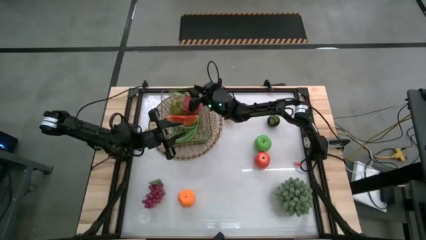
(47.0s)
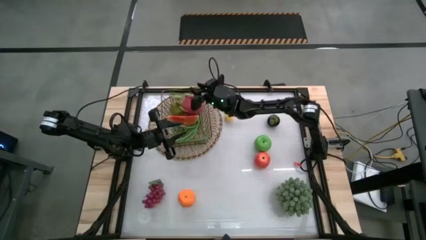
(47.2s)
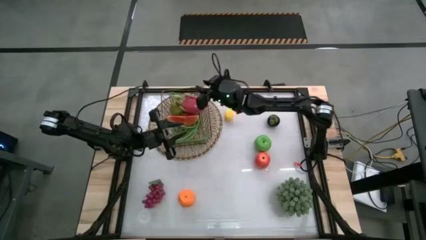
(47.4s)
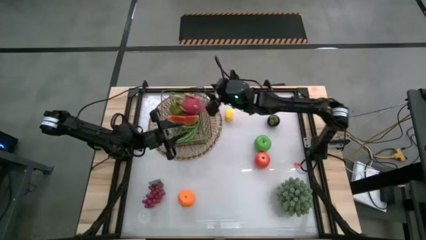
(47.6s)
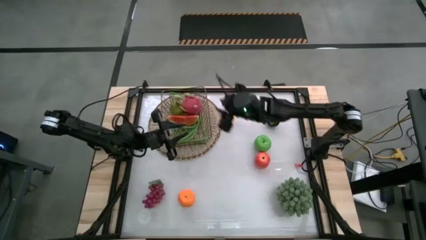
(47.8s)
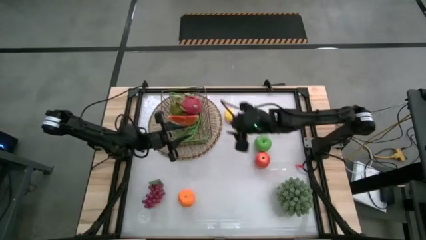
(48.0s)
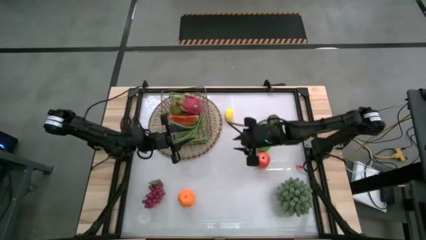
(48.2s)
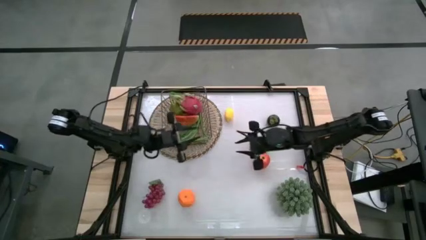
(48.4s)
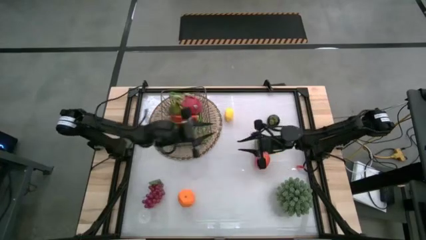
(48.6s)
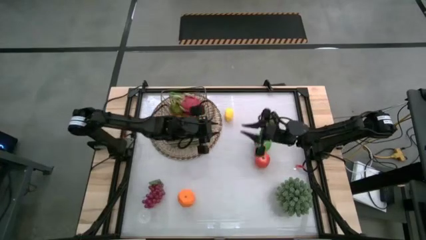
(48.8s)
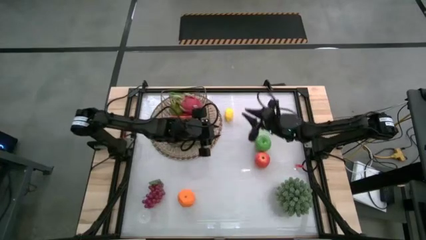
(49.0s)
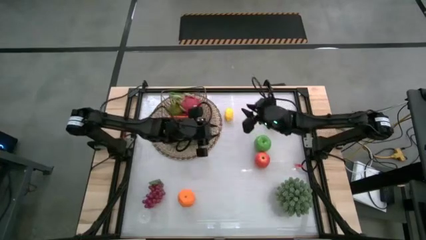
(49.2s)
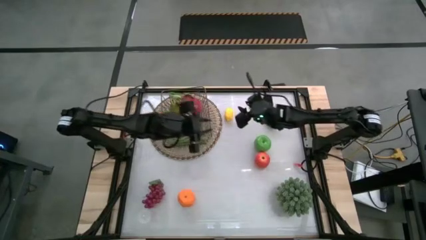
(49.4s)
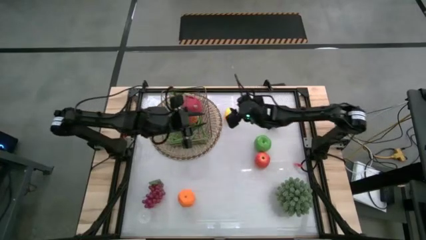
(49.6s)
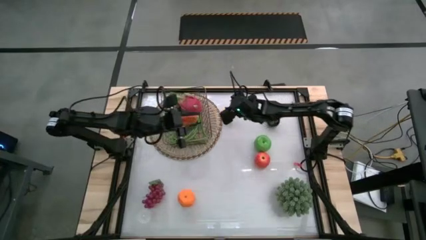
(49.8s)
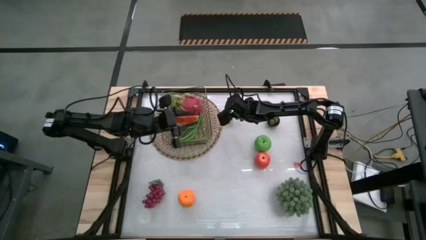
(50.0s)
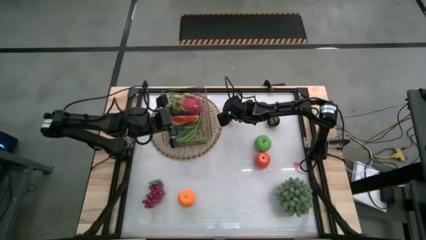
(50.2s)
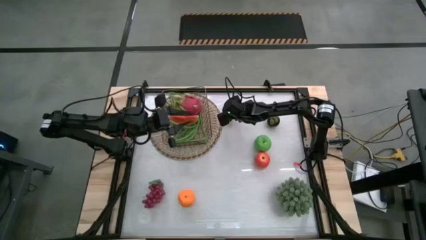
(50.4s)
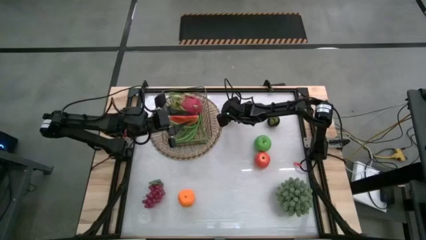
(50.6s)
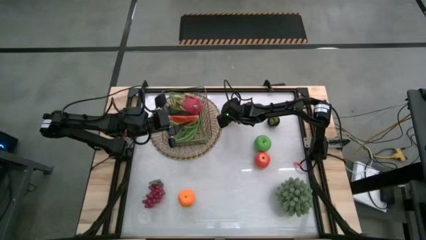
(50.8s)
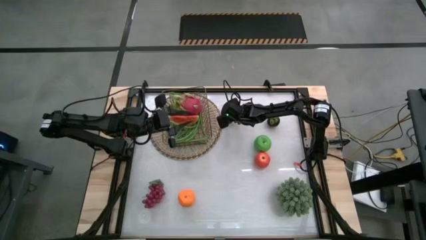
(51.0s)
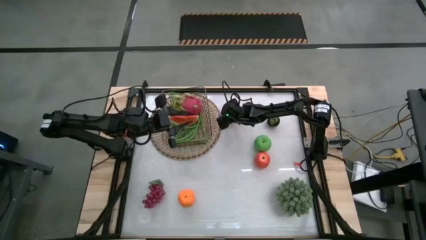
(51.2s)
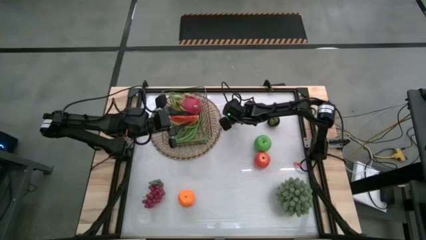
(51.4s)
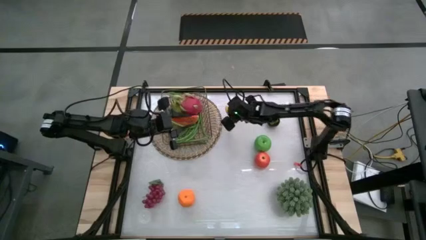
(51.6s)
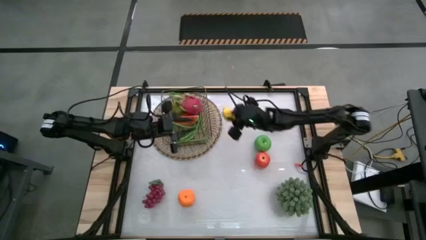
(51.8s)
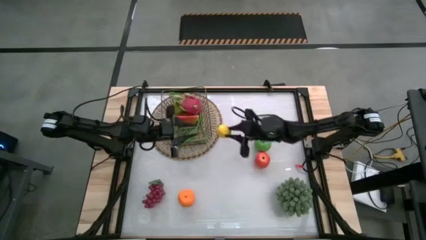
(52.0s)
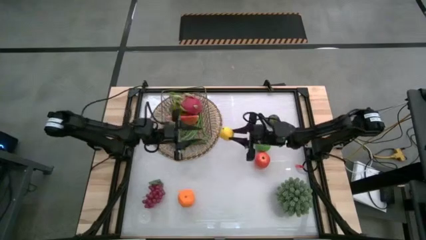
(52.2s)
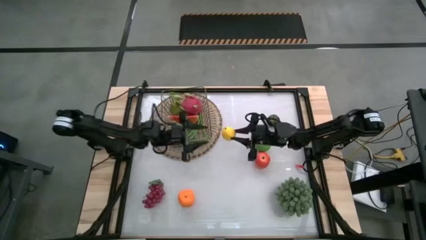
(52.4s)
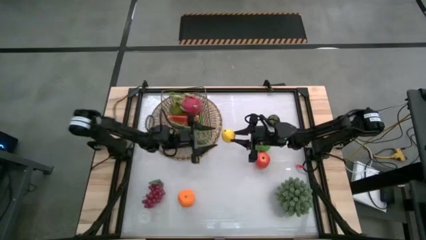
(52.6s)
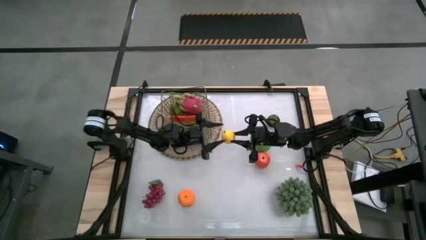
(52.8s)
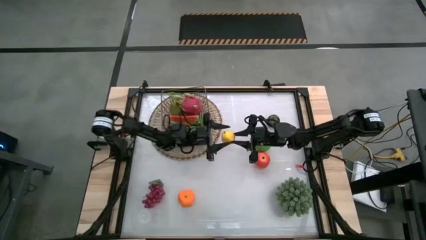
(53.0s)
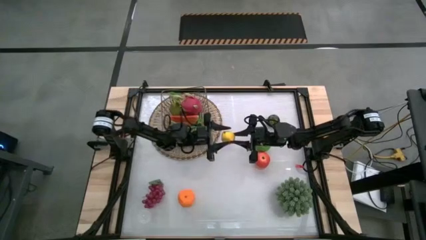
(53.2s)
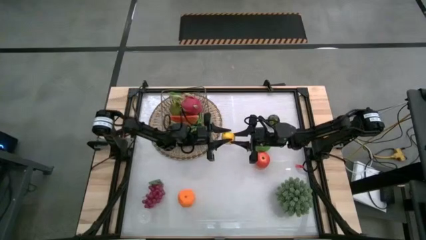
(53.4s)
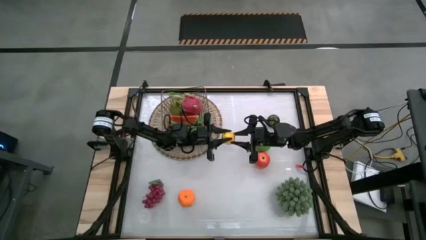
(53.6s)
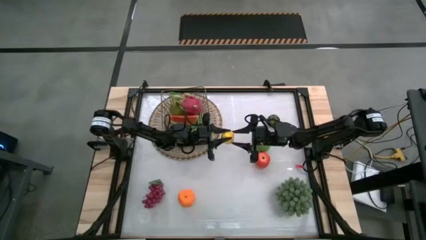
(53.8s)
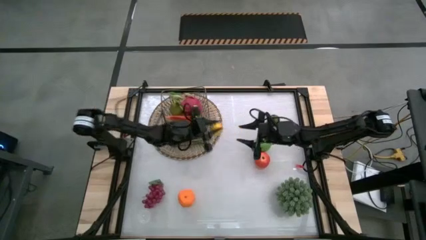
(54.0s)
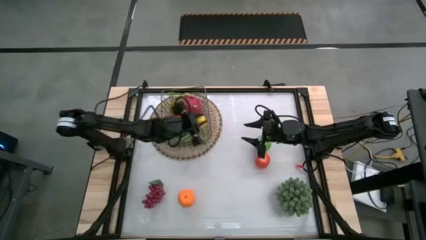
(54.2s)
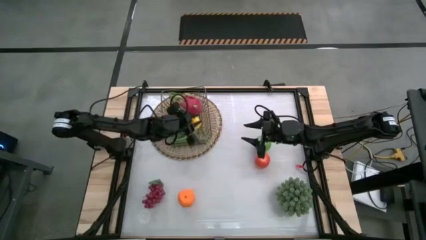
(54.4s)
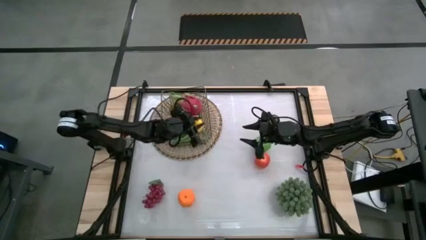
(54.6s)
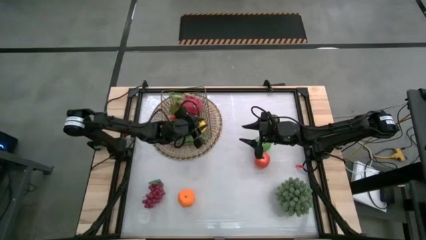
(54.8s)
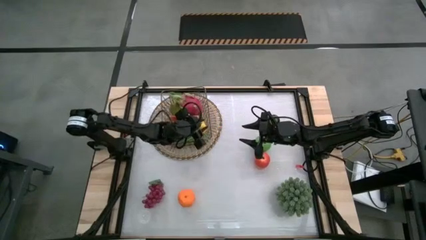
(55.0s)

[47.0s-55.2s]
Task: Build produce basket
Put the yellow lemon into the wire basket

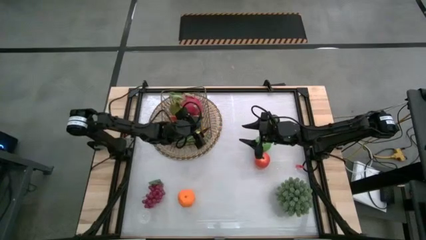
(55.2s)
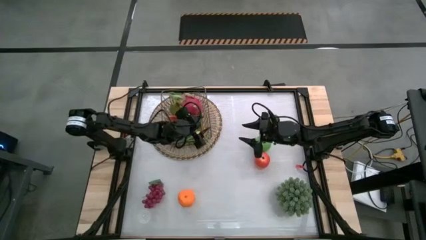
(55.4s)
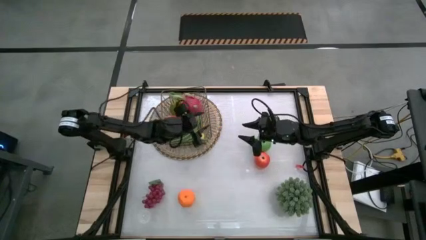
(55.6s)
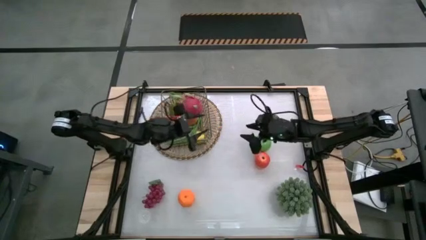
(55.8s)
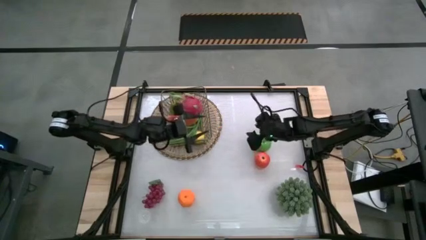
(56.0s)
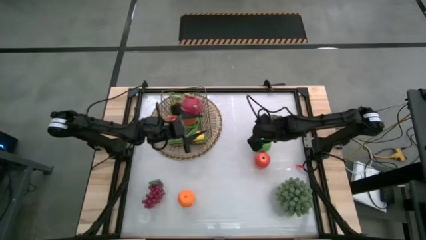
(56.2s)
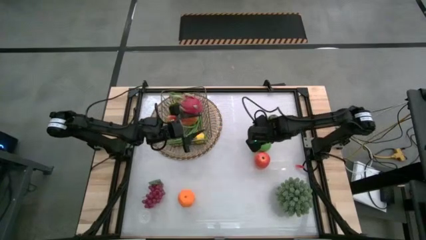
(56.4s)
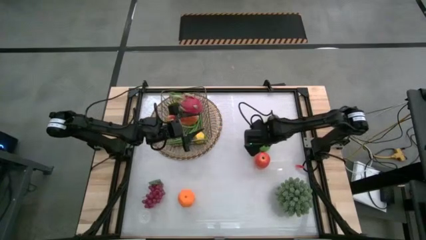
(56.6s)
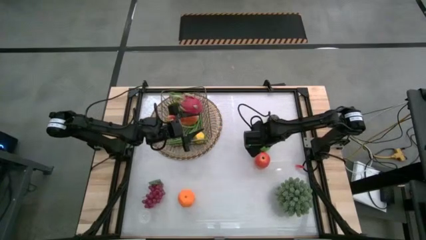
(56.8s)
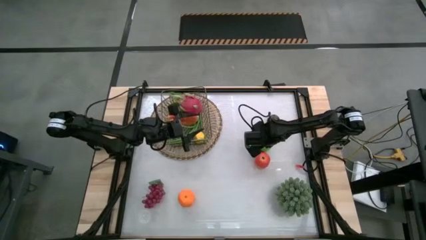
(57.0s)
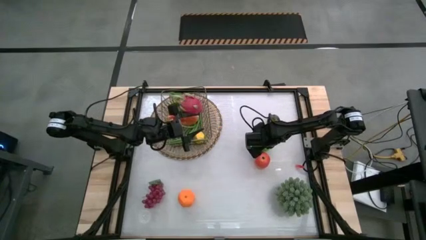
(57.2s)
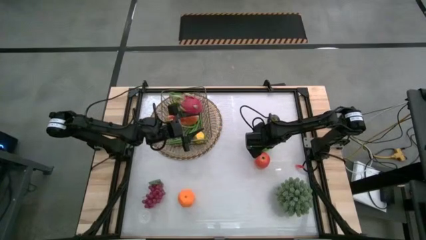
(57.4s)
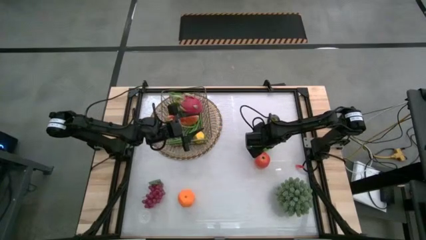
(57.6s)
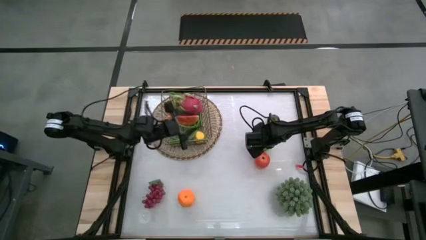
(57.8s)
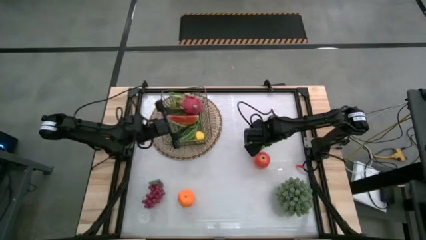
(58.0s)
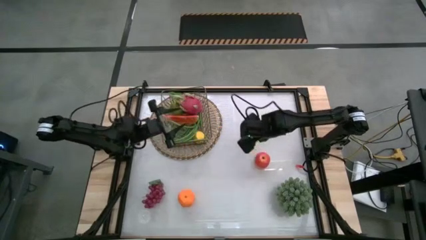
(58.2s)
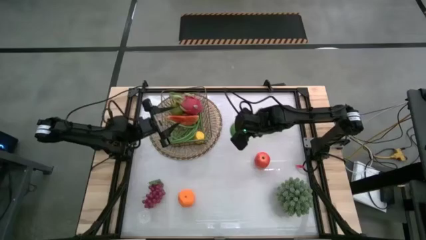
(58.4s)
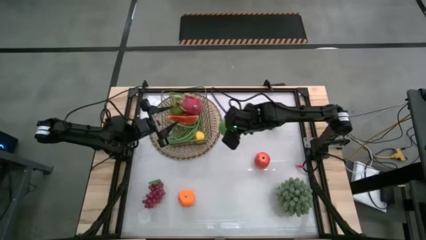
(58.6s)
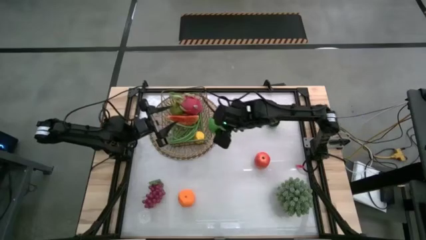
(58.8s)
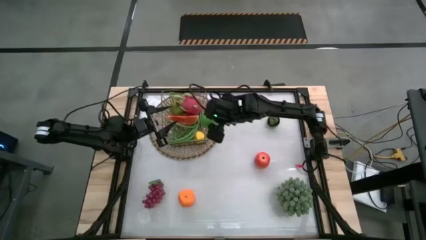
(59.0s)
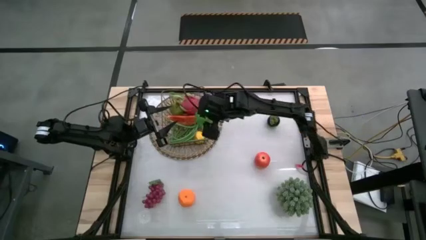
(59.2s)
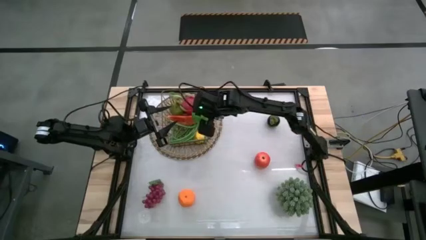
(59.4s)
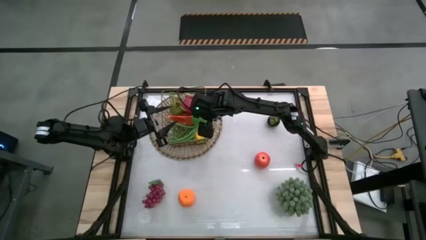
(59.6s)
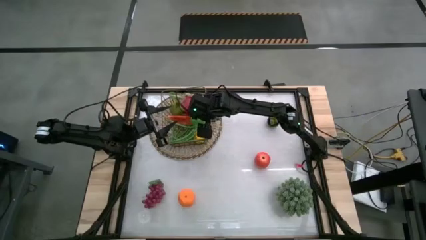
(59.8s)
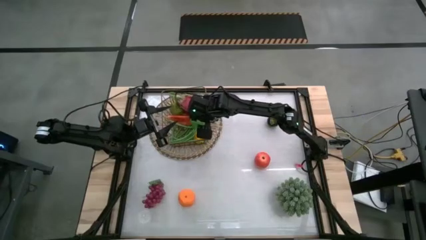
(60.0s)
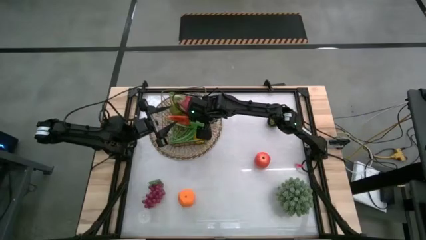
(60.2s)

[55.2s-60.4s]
Put the green apple into the wire basket

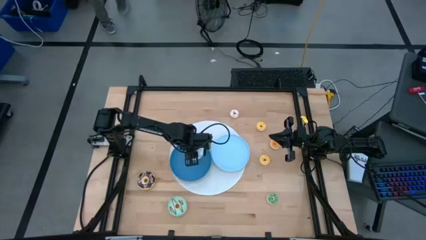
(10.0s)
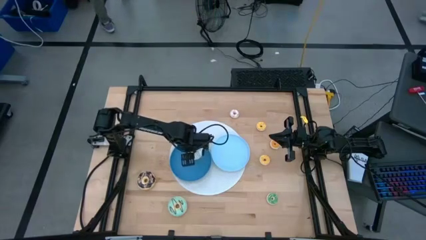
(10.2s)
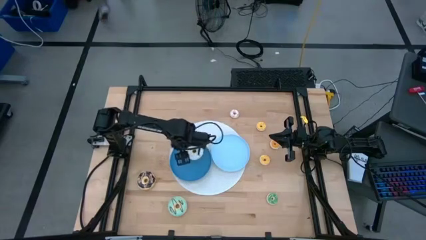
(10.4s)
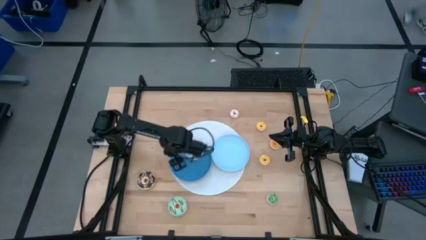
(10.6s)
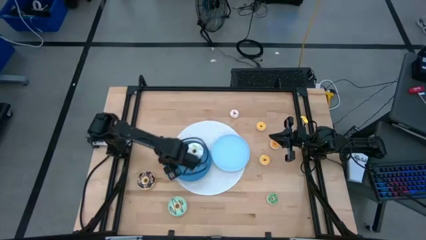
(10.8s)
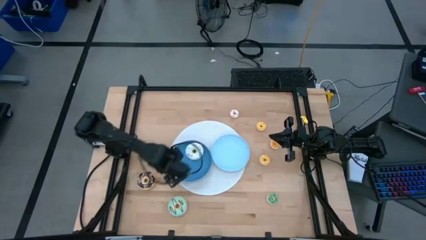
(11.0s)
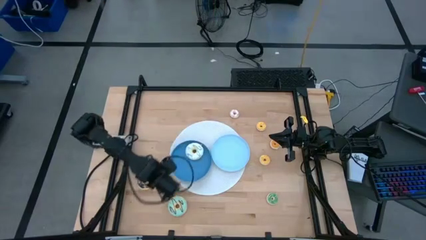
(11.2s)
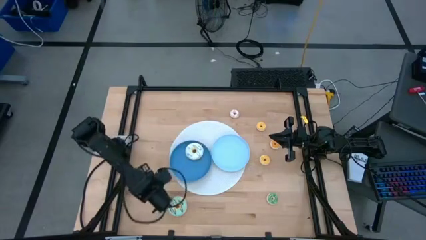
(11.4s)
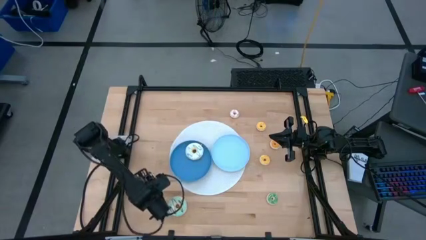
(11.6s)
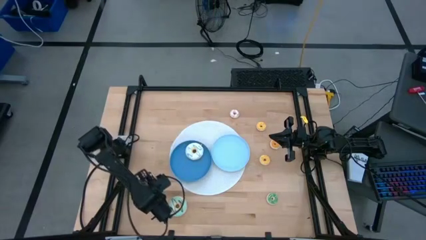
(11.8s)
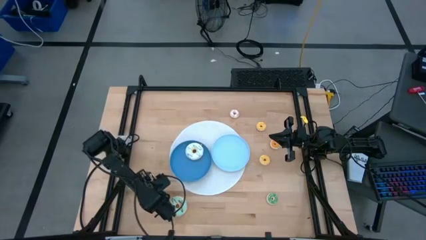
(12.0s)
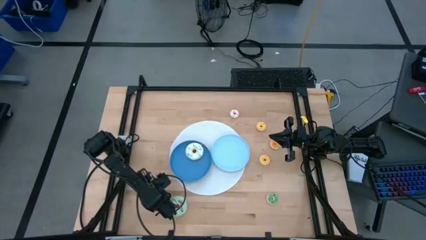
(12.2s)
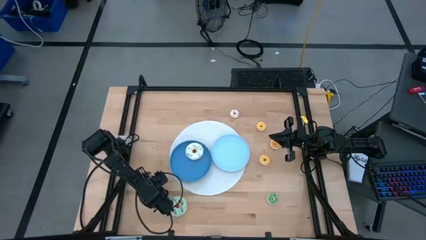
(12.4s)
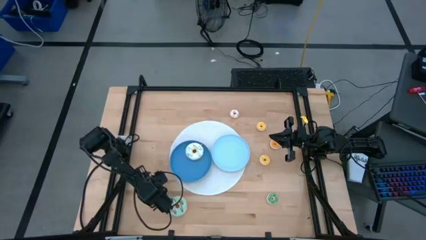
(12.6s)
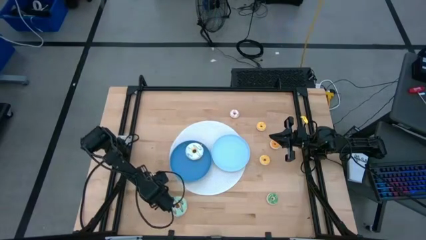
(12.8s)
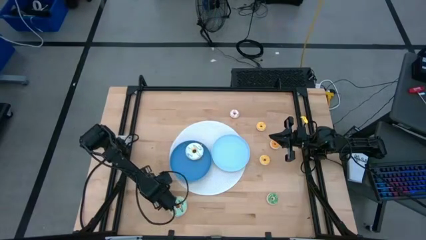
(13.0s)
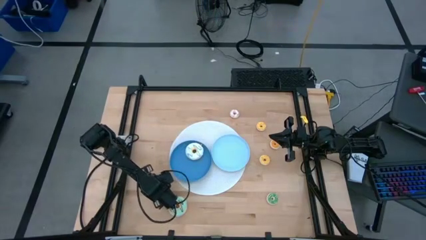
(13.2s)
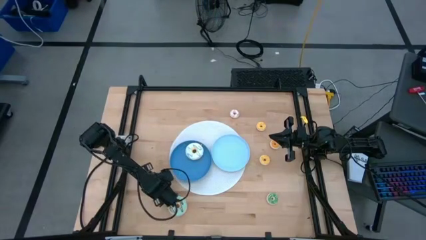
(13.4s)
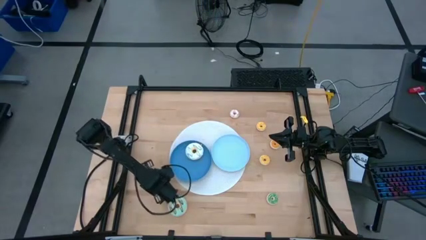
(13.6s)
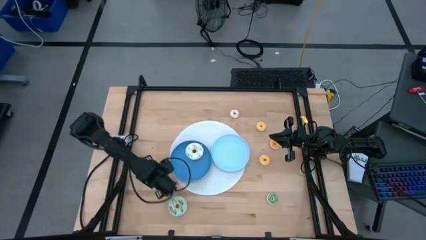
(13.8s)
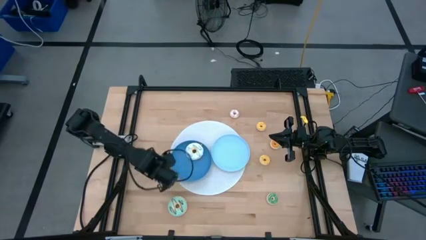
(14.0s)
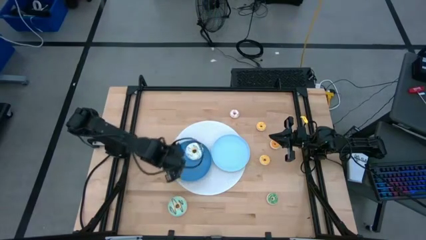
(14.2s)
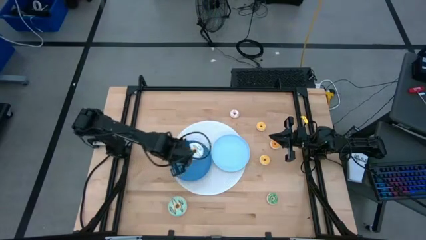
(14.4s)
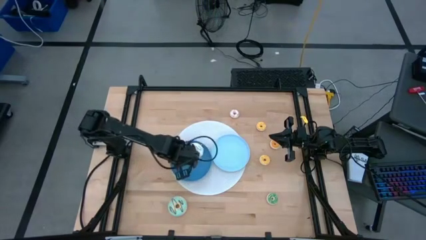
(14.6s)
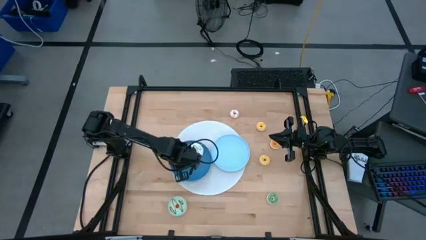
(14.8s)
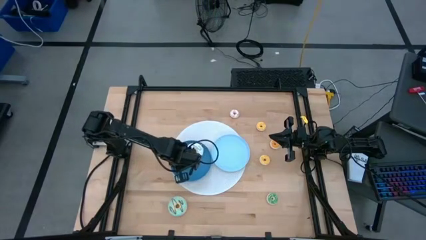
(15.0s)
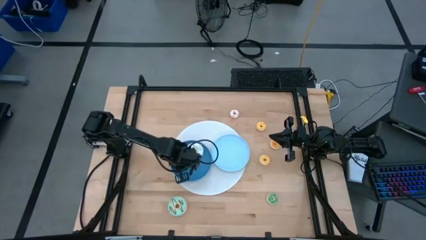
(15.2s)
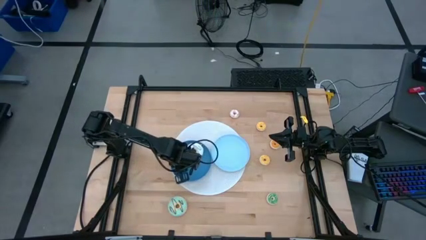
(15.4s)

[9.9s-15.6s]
Task: Pick & Place donuts
Put the large black donut on the blue plate
